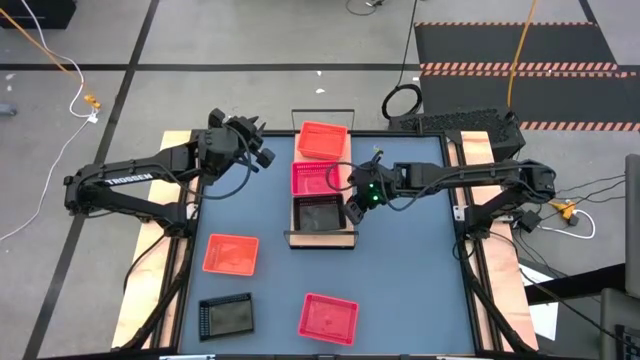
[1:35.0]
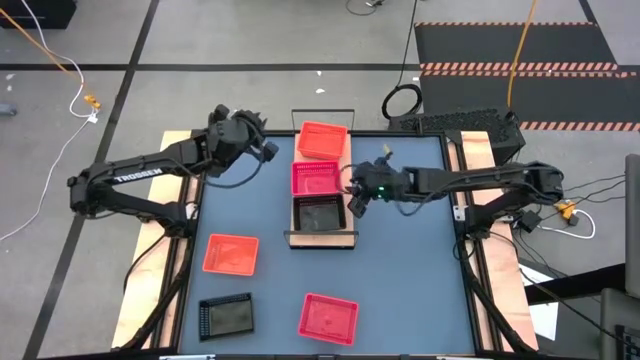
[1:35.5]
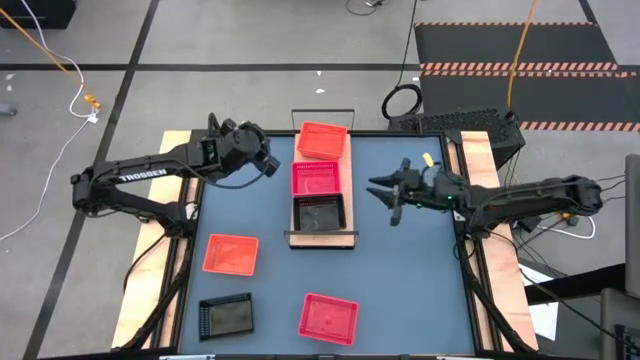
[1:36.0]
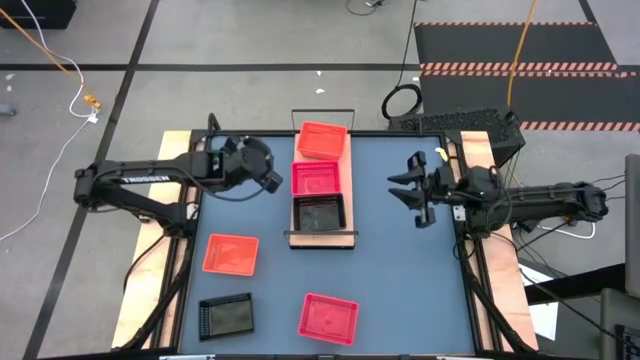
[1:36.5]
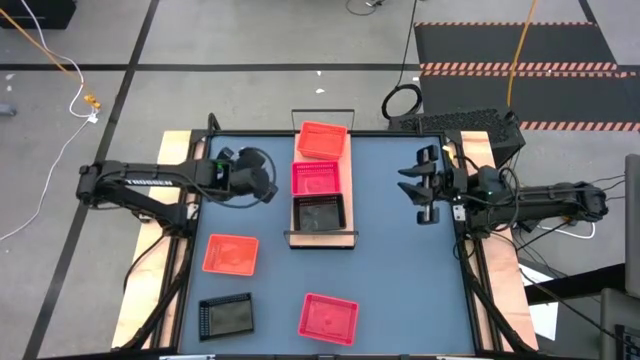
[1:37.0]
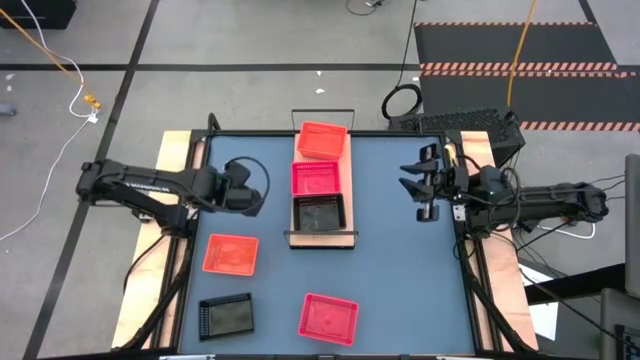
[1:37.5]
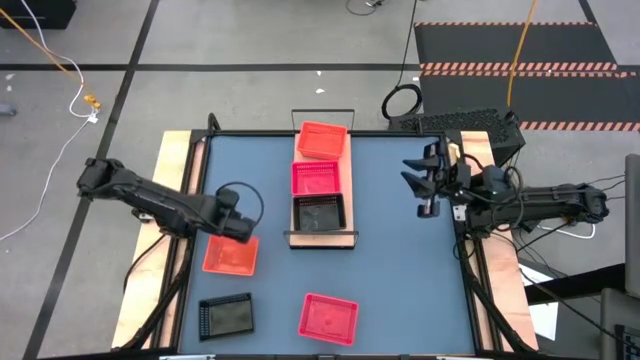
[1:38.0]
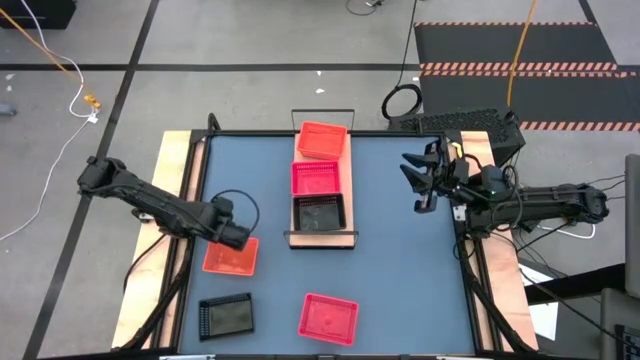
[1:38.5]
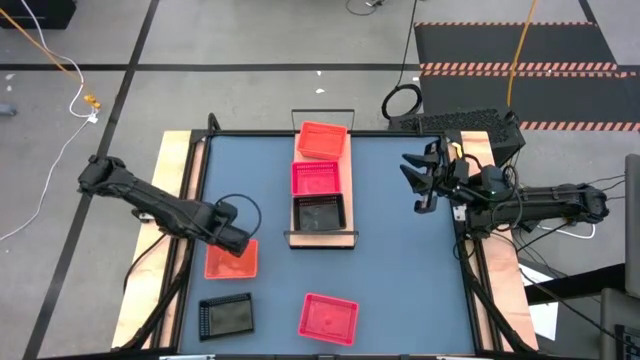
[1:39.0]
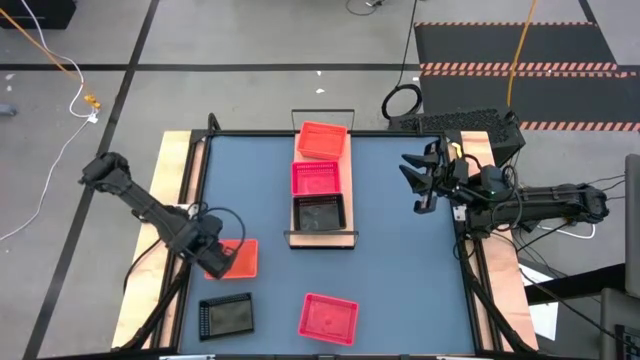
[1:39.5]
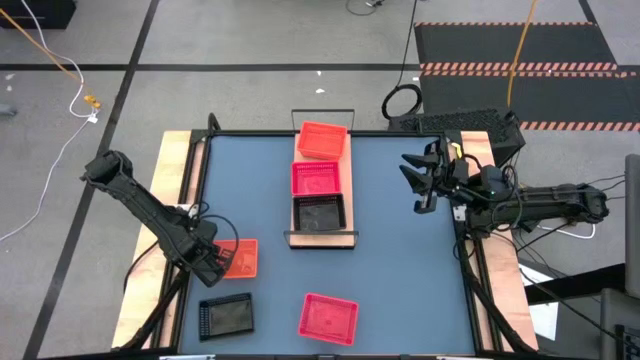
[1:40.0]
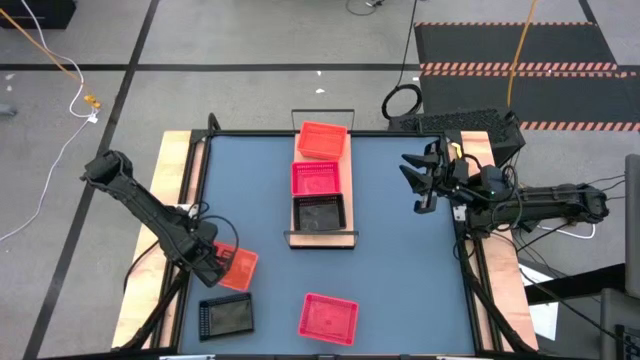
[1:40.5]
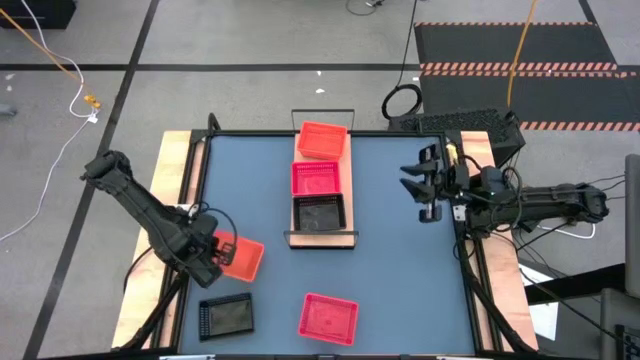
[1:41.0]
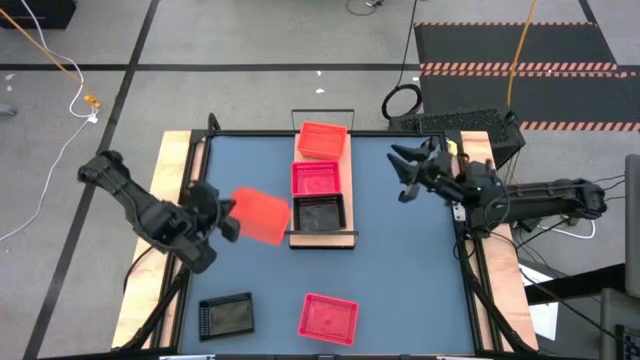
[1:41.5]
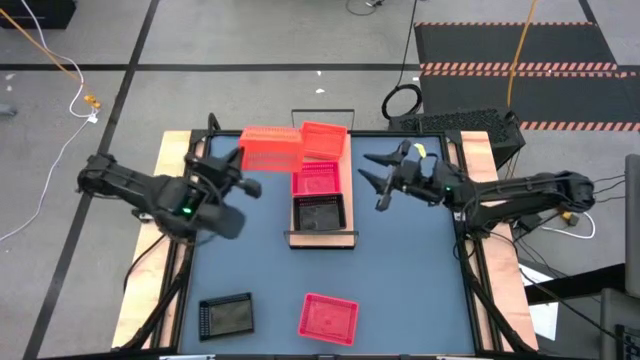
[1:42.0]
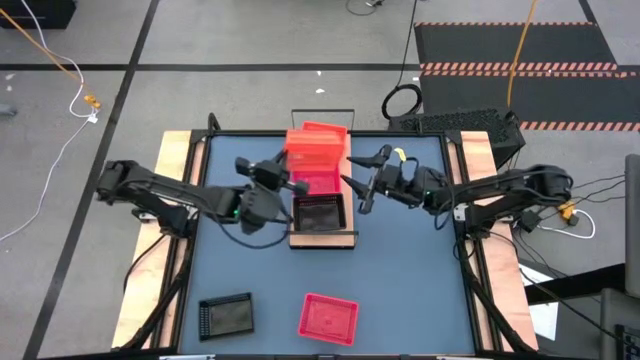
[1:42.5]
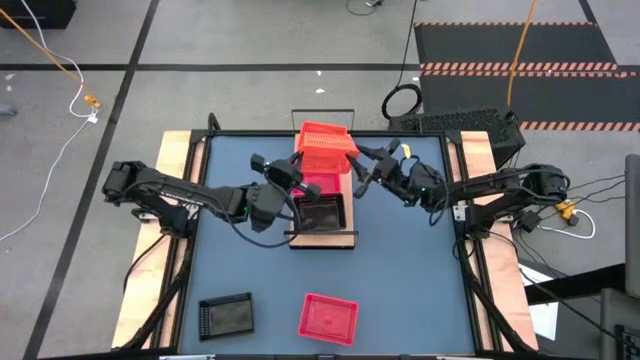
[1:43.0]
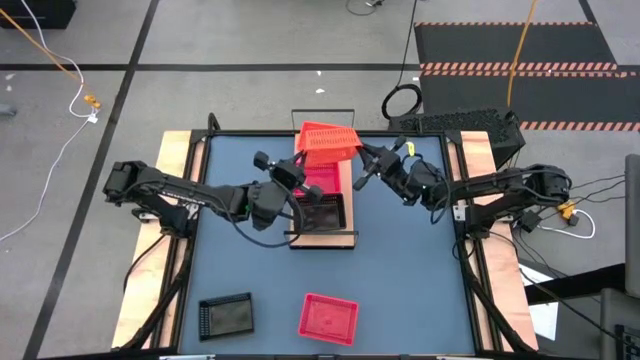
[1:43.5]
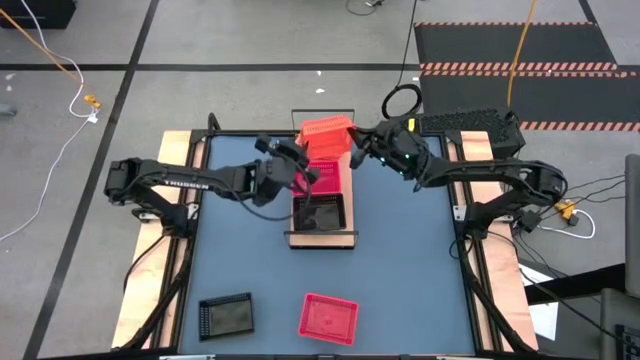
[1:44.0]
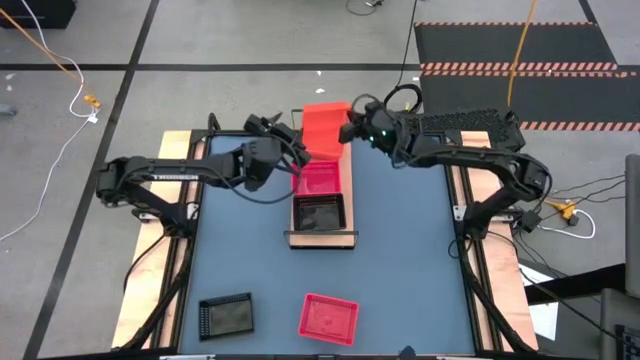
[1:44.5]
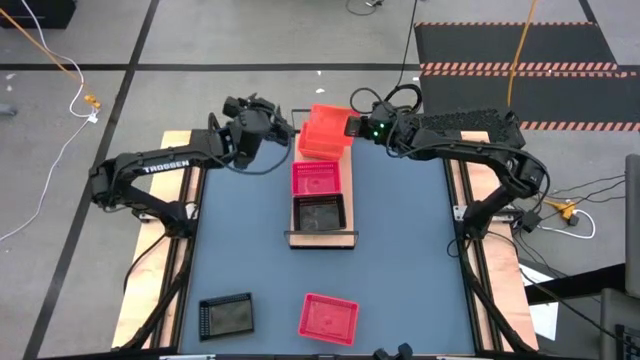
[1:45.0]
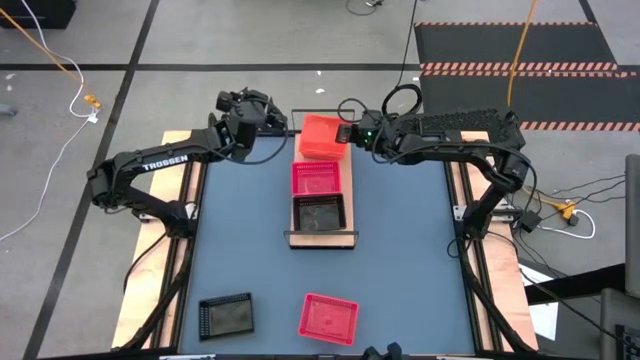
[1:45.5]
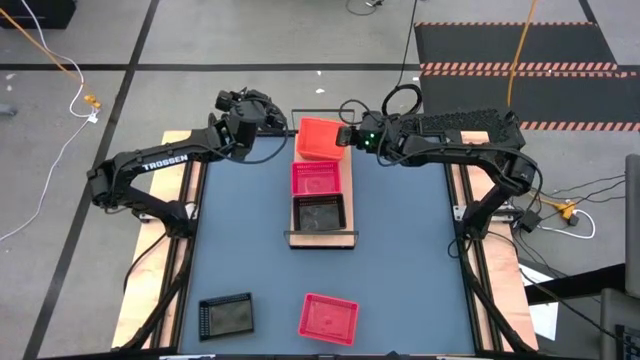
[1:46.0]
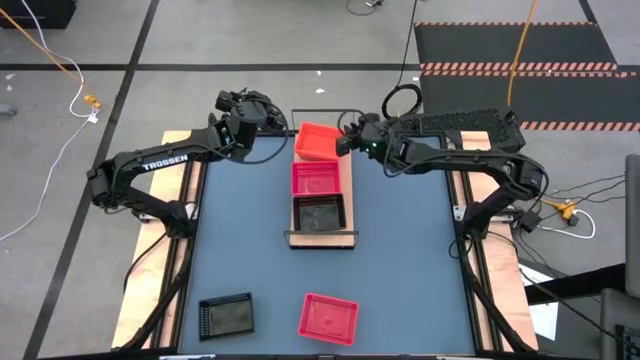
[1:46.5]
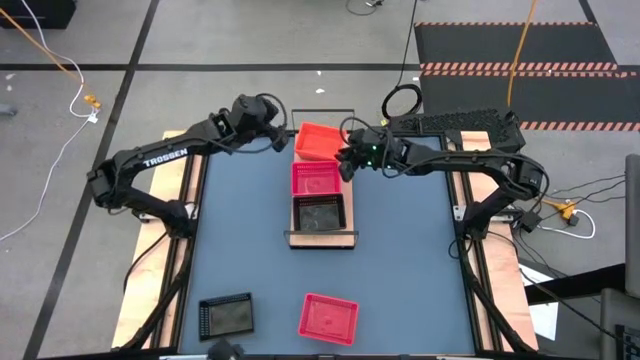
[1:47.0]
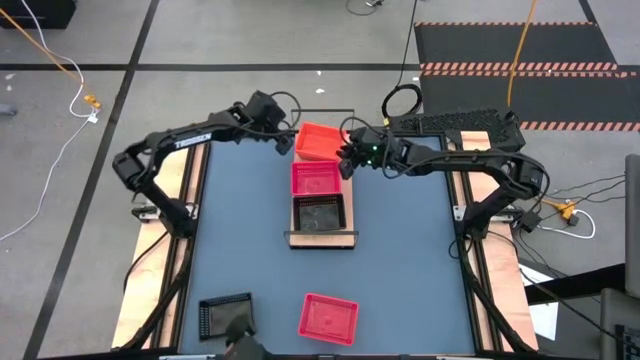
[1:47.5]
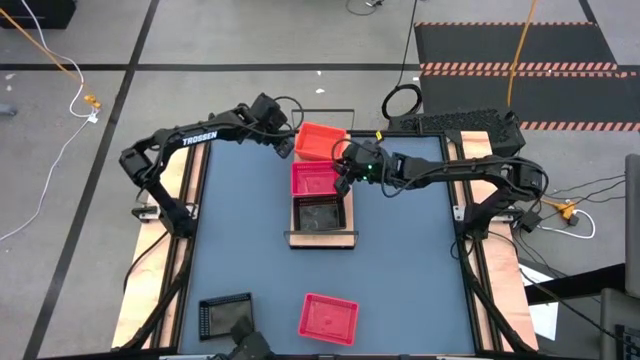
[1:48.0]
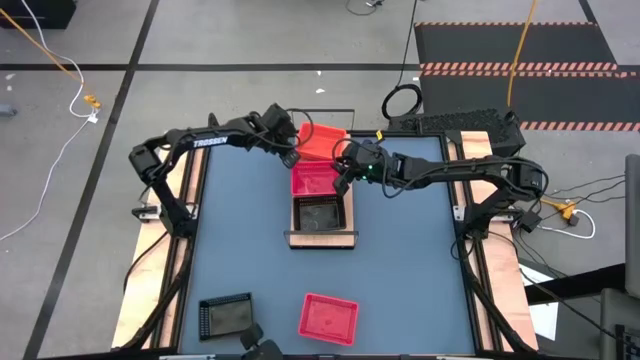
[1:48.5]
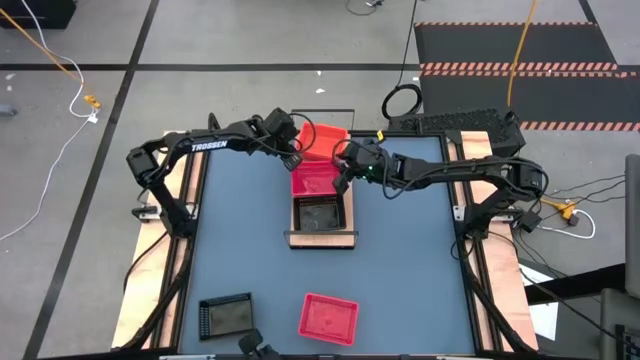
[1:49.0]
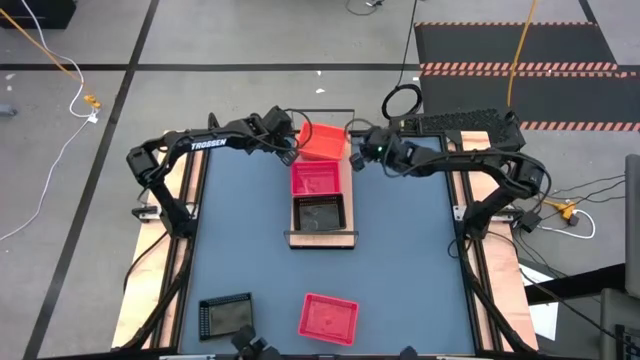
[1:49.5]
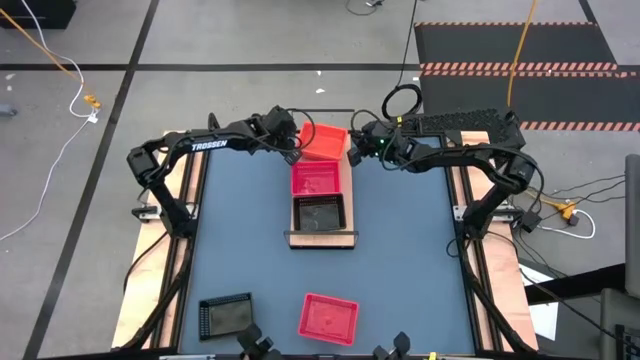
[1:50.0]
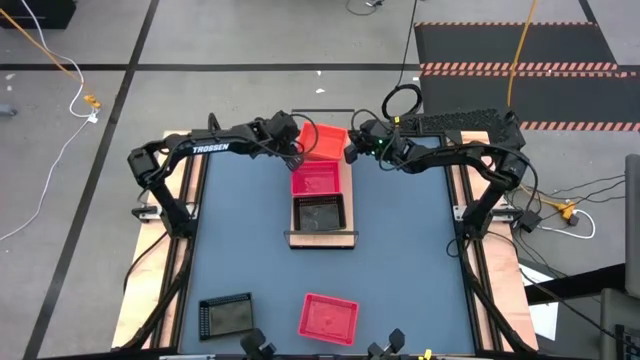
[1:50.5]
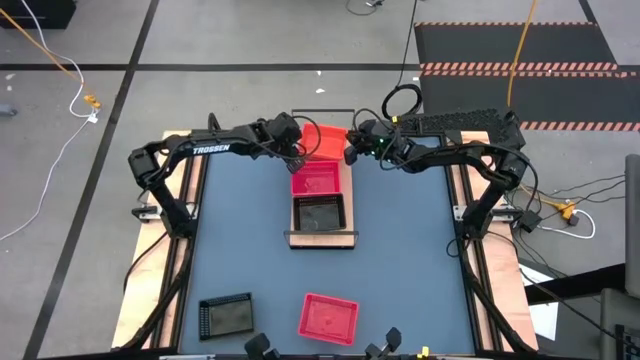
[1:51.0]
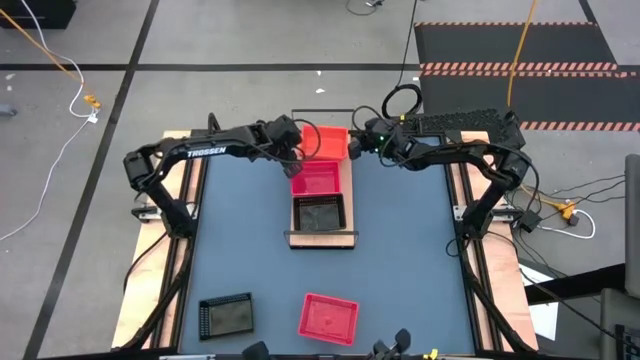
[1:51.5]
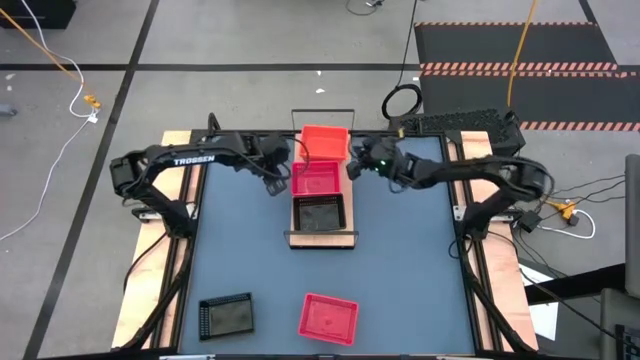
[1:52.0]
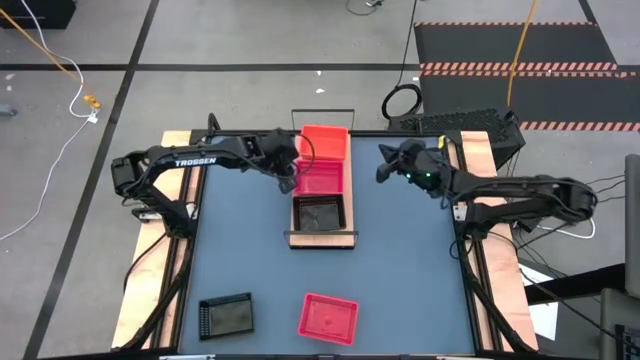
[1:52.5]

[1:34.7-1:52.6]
Task: Stack baskets on shelf by color
Stack the orange bin on the stacked orange bins on the shelf

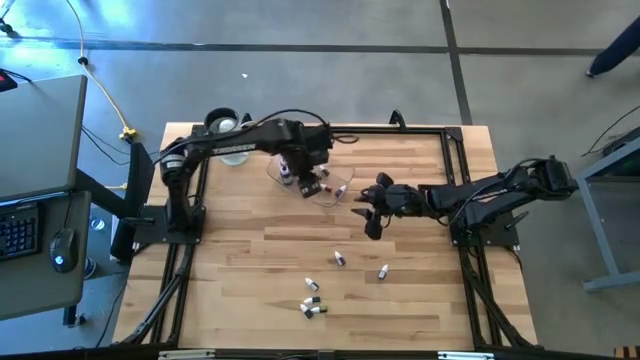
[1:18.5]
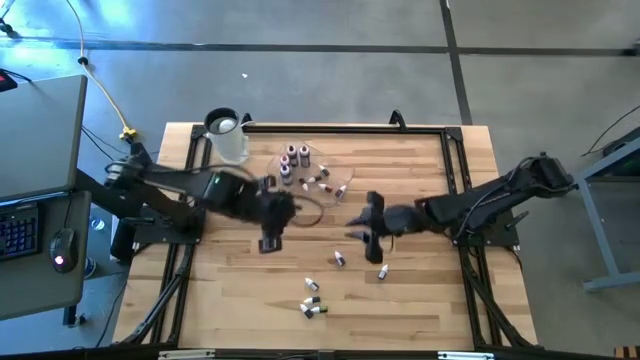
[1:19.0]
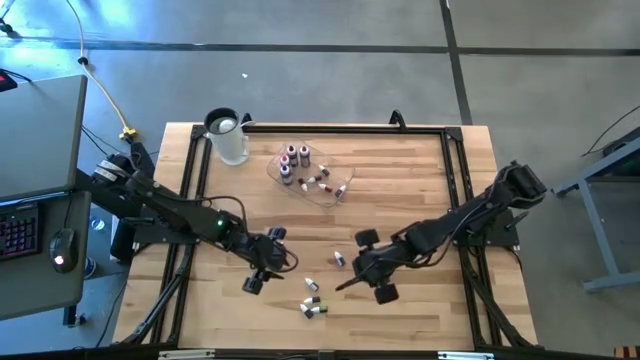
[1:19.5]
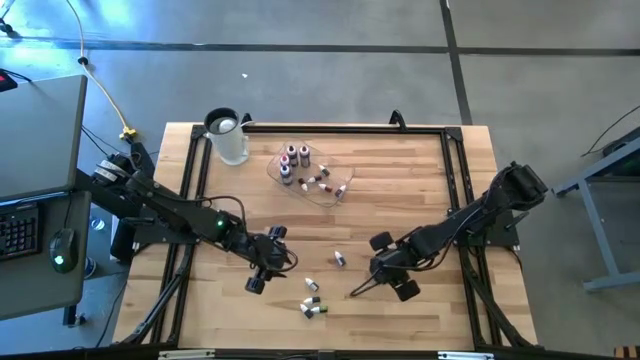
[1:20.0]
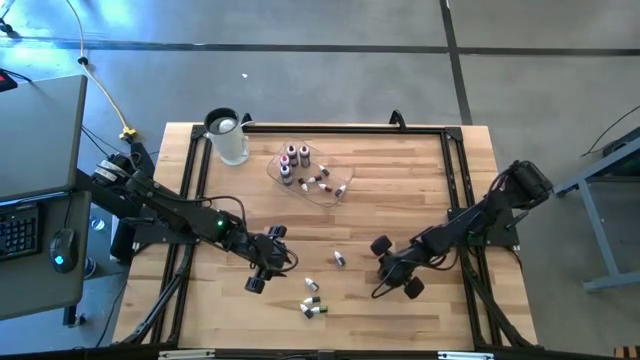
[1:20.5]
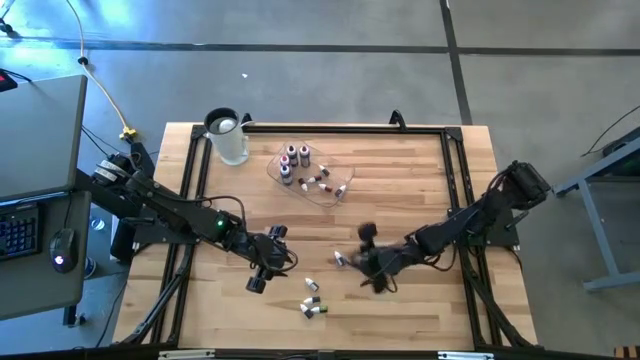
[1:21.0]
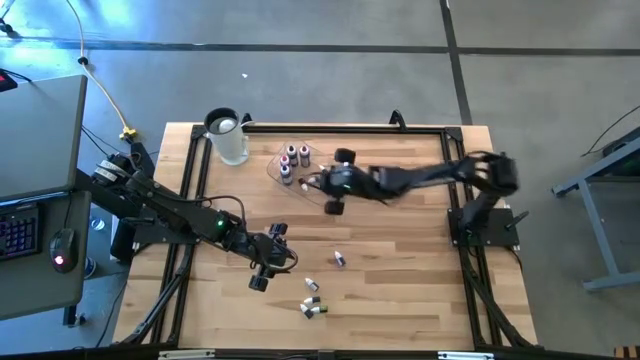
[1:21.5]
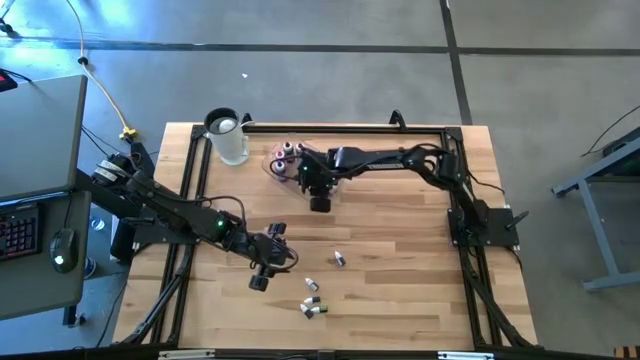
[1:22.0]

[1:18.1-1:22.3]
Task: Pick & Place food coloring
Put the top small black food coloring bottle into the bin
